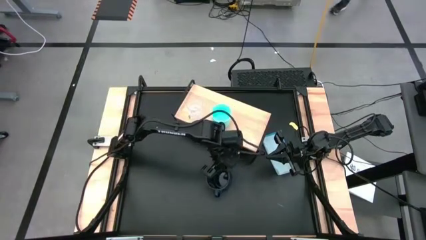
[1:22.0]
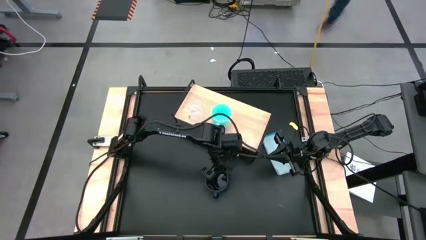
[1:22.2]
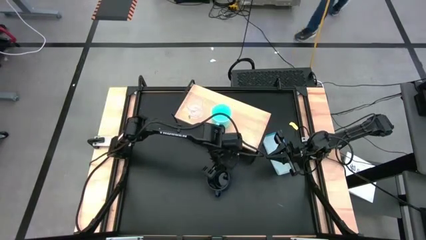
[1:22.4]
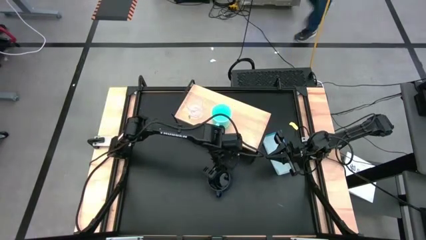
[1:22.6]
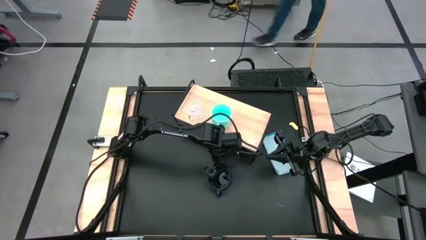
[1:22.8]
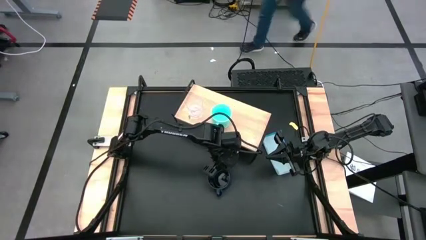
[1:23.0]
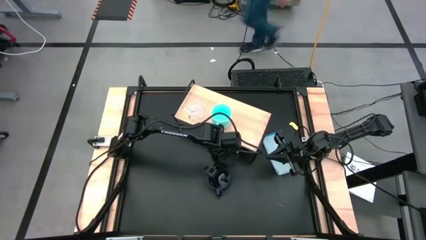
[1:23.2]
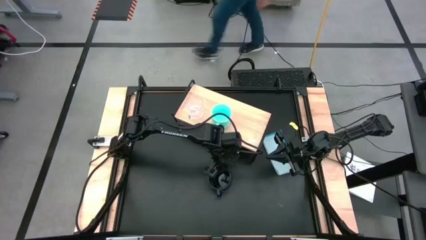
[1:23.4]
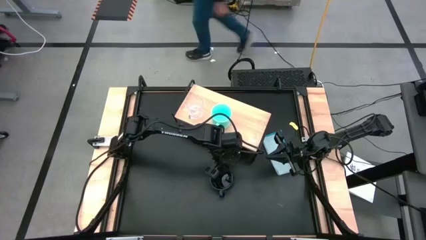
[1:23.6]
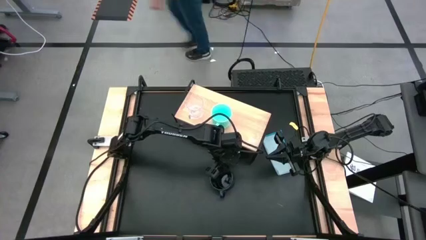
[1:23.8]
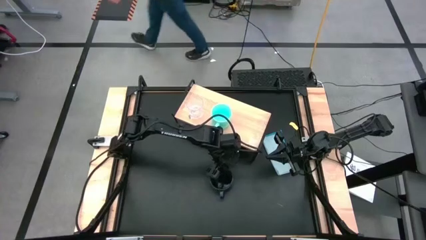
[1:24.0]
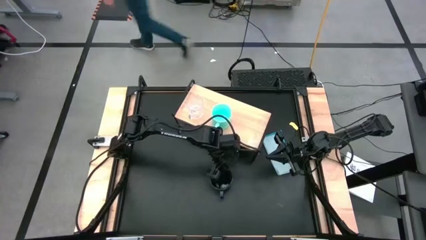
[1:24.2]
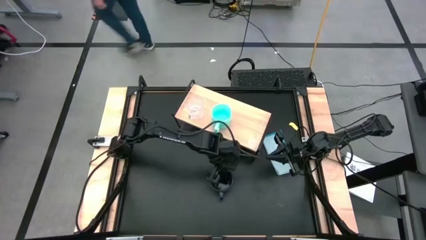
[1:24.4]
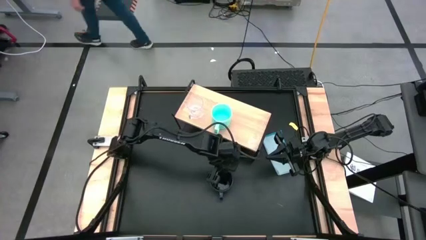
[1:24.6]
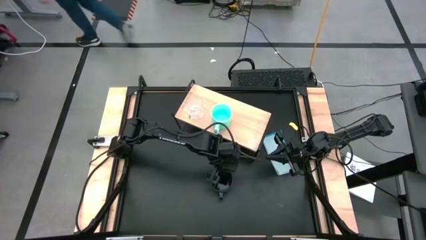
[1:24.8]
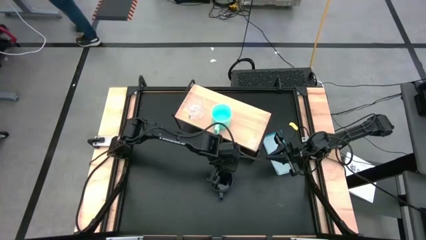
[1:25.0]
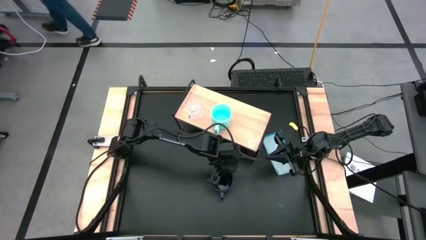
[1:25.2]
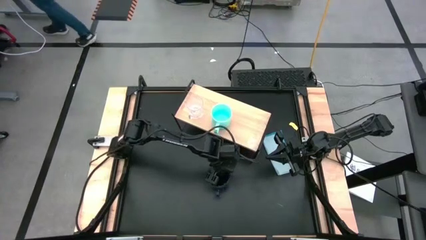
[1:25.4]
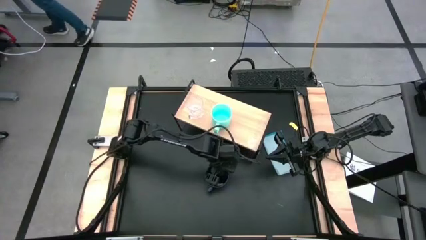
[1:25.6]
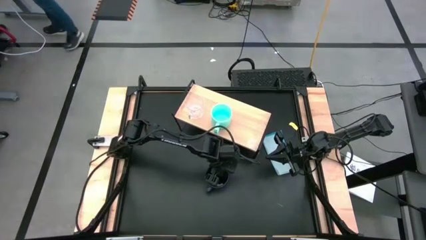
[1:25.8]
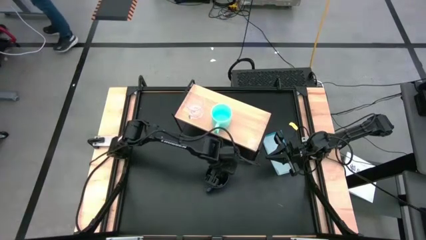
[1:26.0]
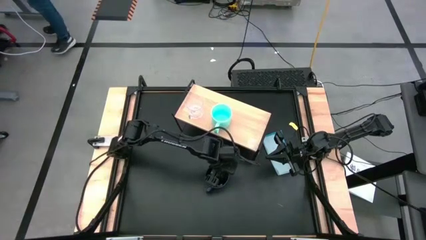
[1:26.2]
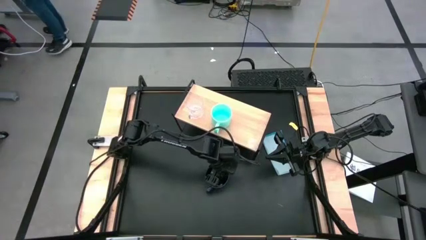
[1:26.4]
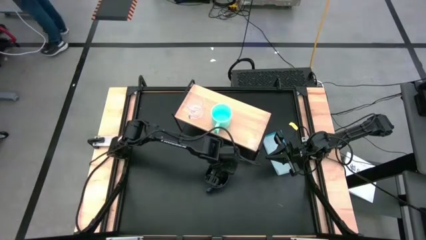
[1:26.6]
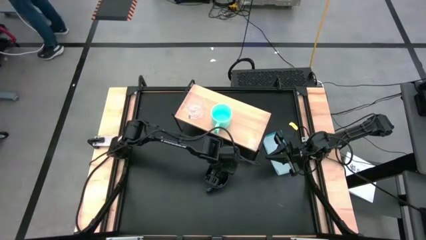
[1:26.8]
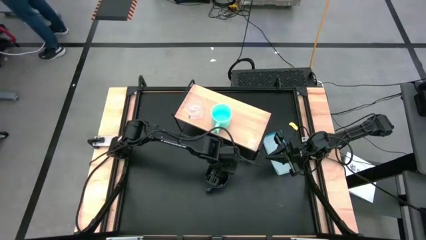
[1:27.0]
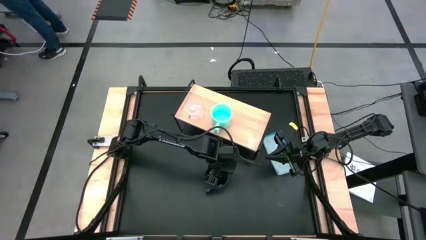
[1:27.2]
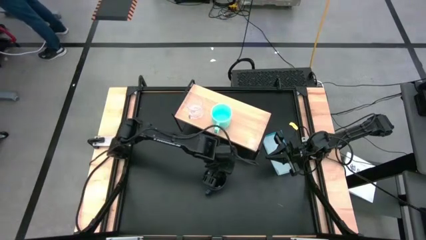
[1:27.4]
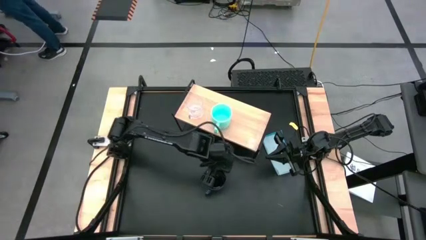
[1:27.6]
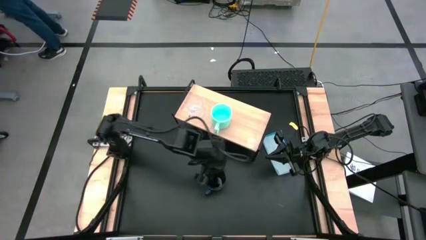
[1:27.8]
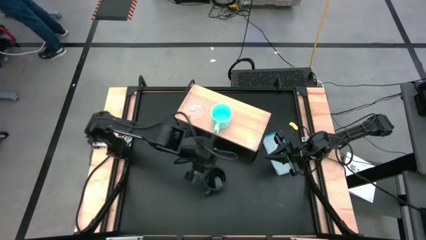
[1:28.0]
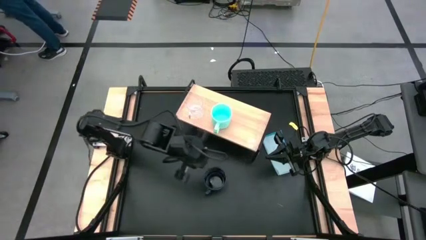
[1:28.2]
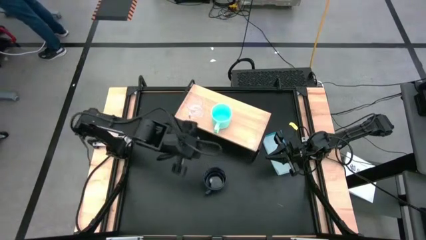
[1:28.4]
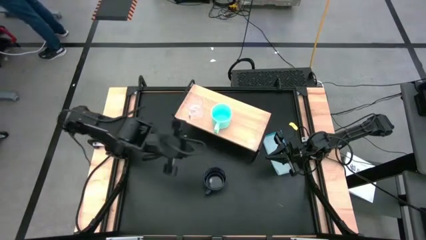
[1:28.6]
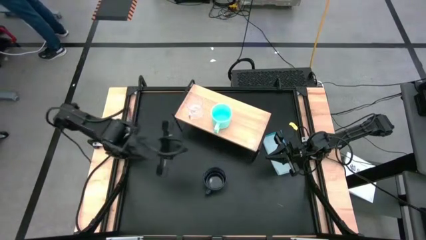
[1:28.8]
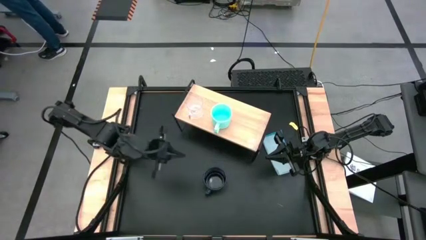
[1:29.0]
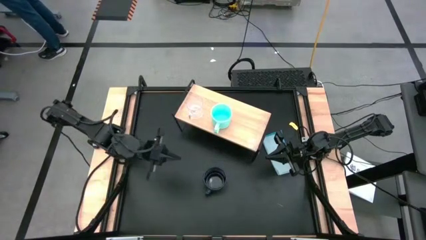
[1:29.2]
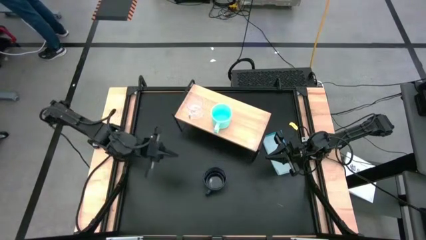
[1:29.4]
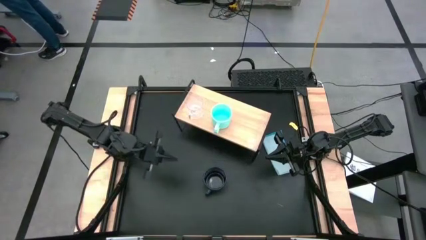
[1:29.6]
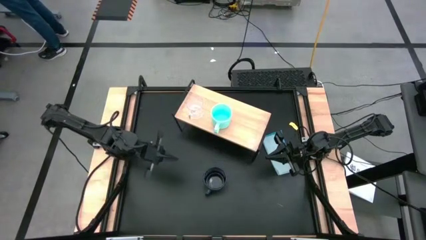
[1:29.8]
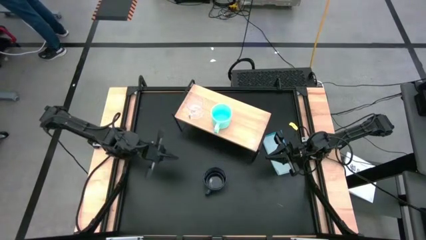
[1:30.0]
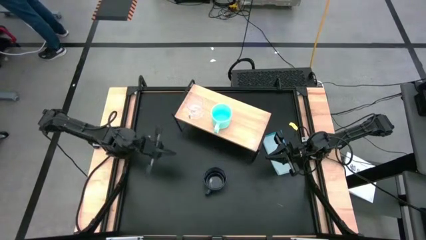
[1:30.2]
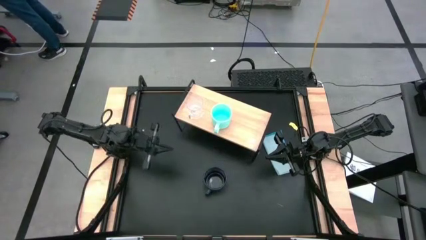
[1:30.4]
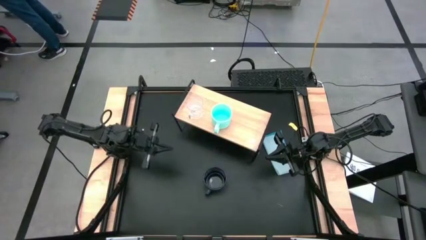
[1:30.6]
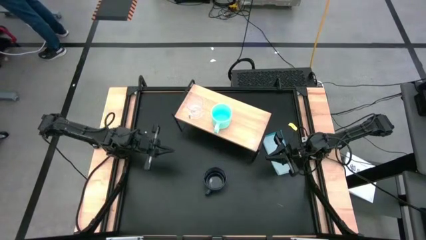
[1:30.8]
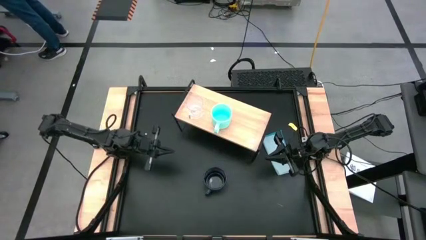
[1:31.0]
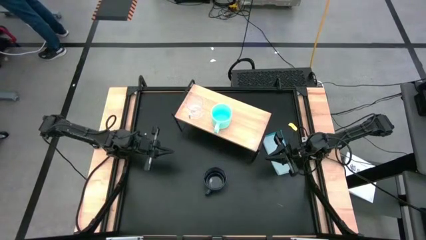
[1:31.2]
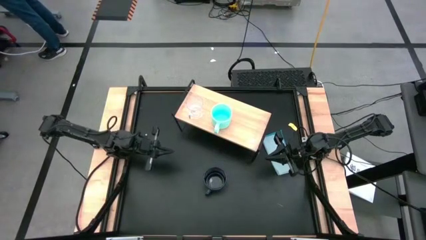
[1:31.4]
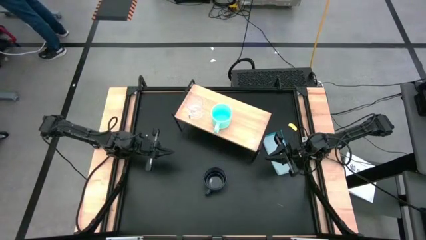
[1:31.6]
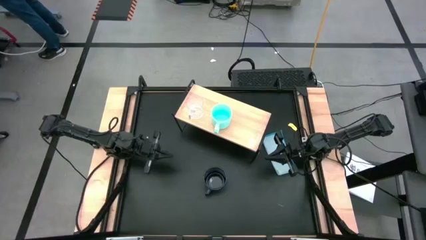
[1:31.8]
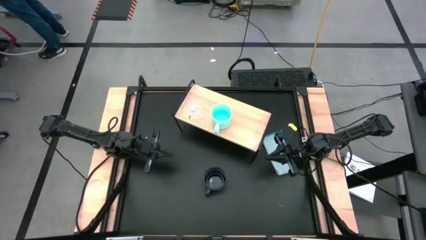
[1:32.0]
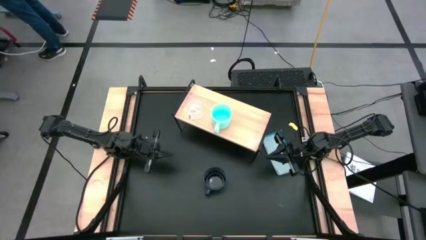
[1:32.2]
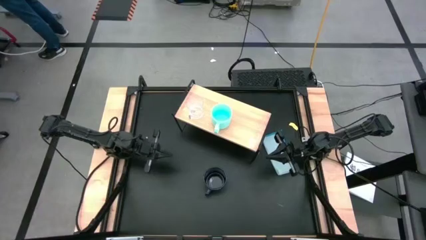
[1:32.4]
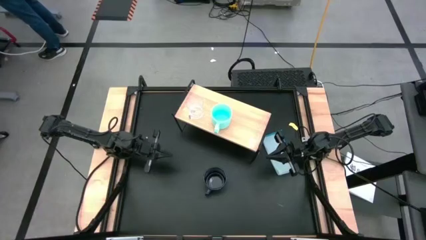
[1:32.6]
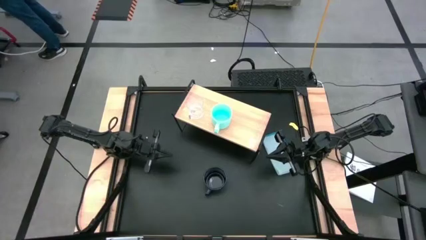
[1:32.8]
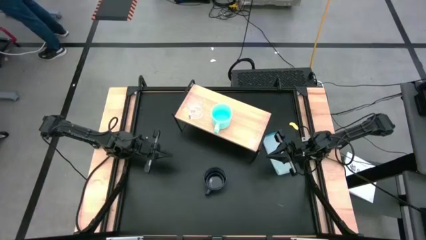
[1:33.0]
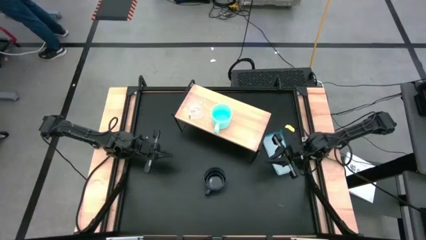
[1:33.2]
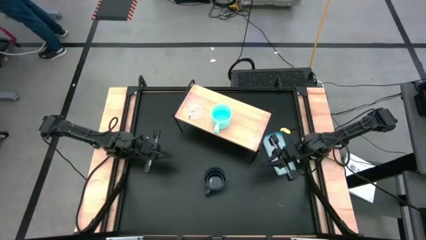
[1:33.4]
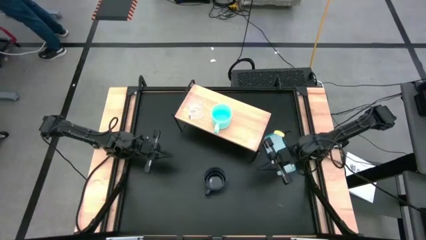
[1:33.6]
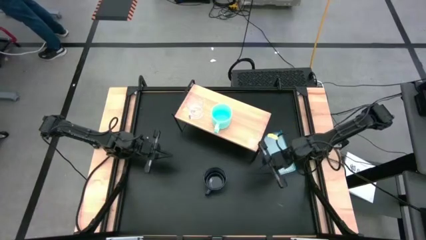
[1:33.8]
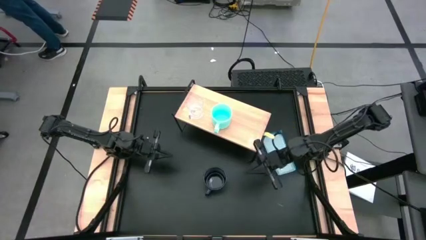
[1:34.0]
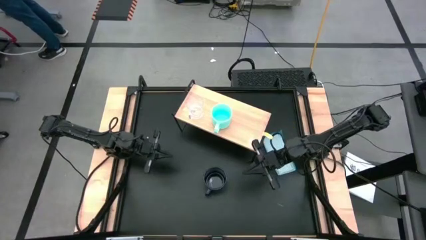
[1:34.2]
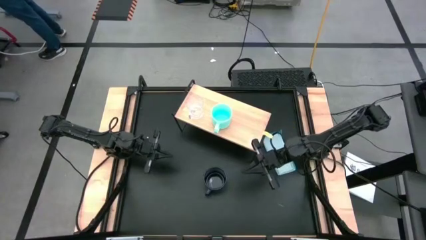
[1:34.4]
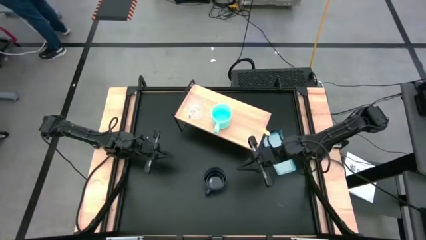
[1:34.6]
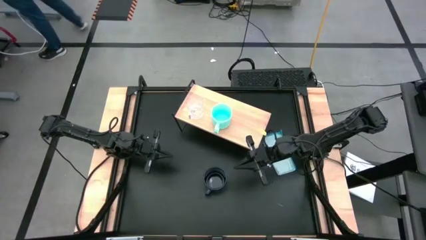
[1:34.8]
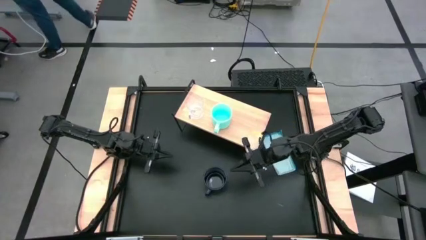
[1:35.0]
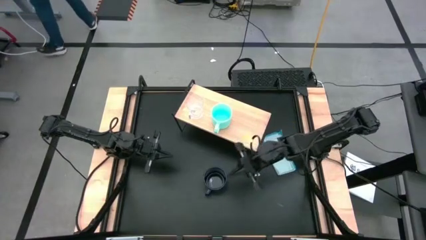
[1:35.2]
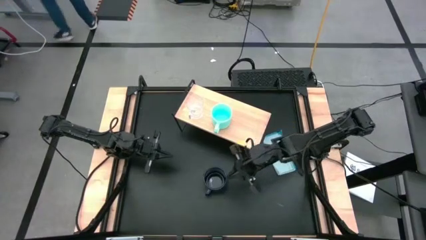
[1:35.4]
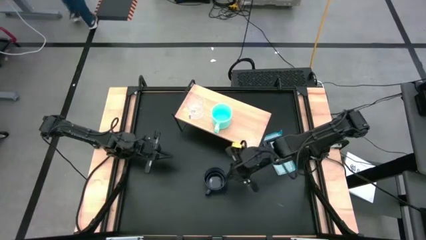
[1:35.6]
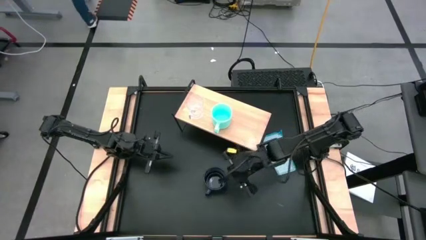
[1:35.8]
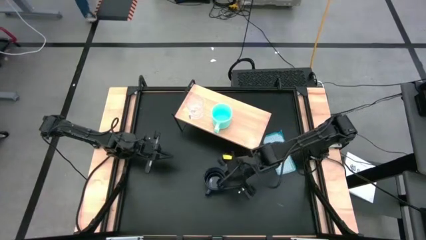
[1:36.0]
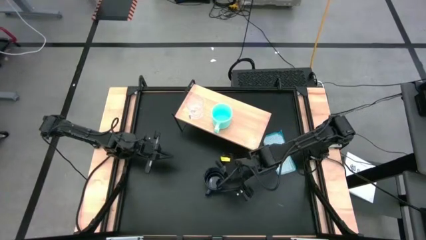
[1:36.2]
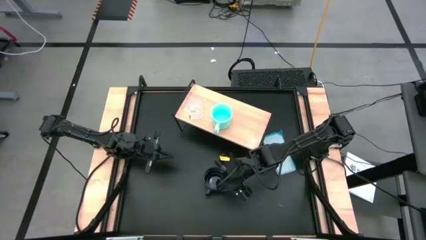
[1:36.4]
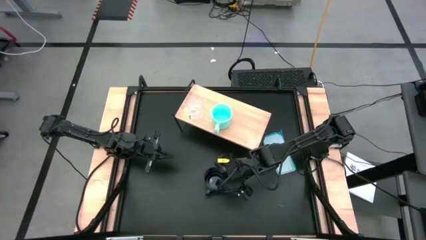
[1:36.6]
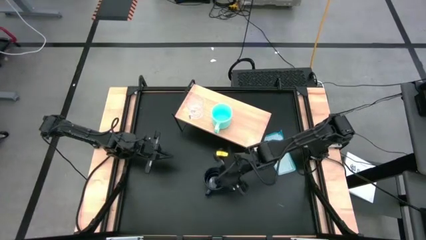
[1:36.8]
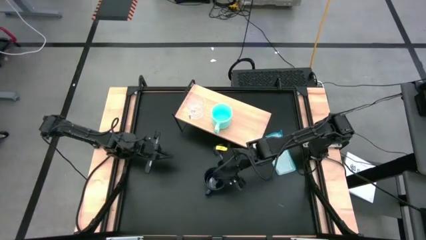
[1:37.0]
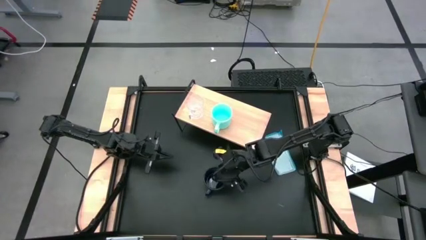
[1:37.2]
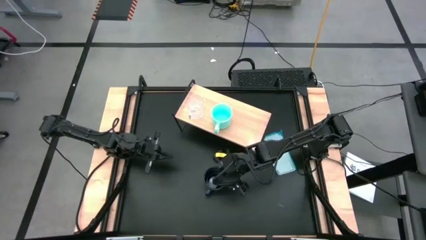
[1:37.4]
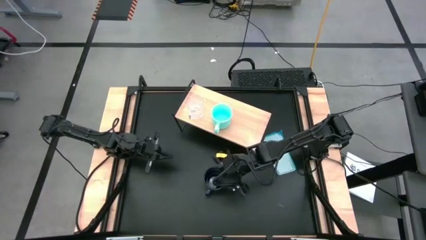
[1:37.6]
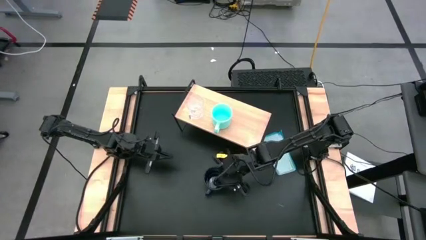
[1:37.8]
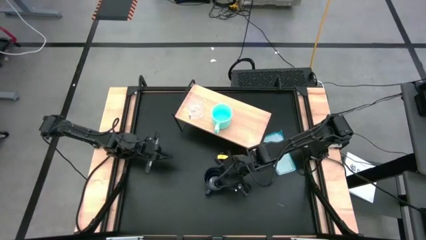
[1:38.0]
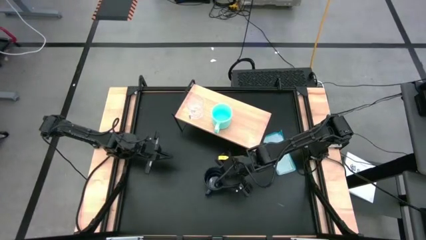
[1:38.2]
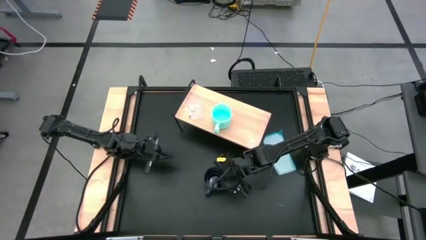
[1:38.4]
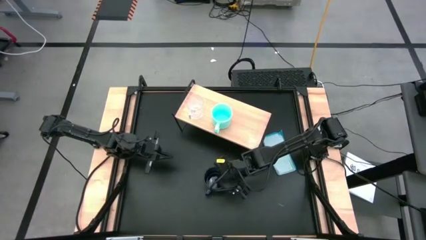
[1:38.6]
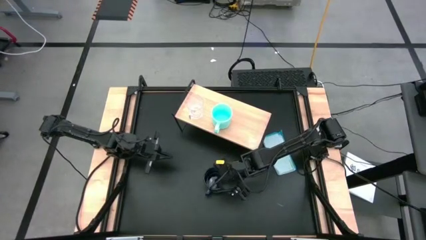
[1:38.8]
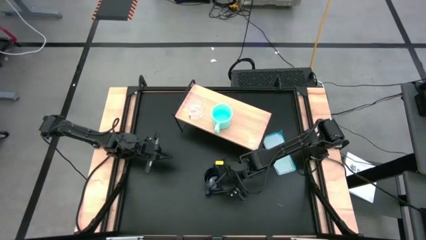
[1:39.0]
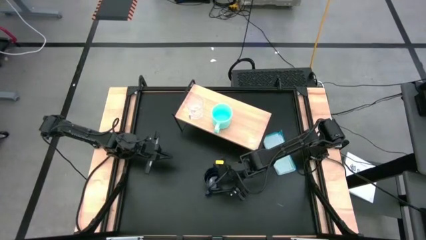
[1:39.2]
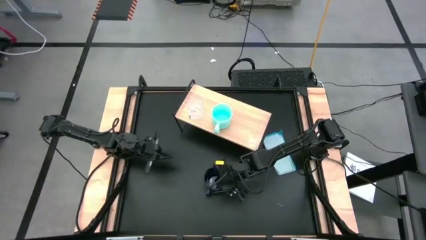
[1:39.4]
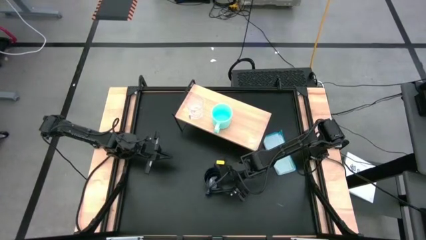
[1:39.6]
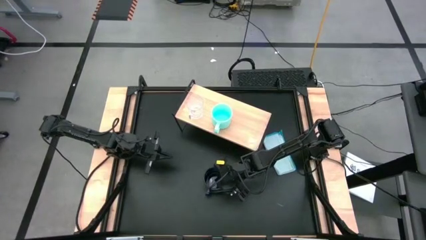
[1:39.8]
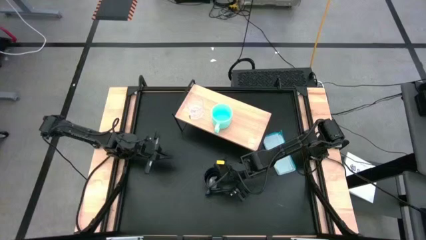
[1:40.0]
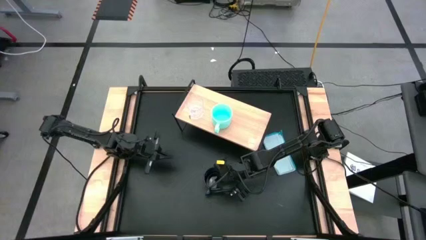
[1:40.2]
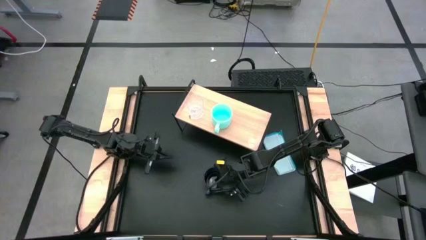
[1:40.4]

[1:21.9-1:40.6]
Task: Stack small to large cups/mugs on shelf
Put the dark blue mug on the shelf
